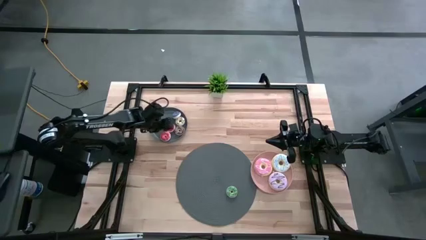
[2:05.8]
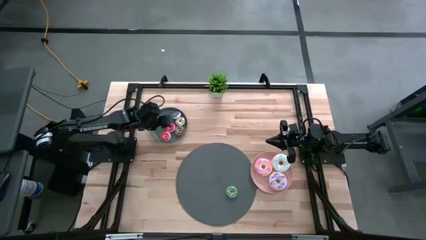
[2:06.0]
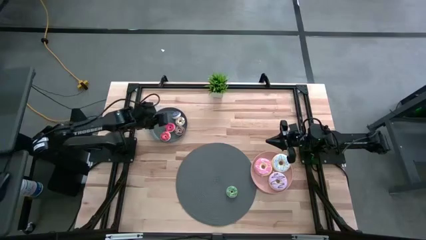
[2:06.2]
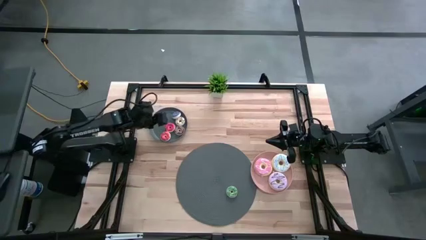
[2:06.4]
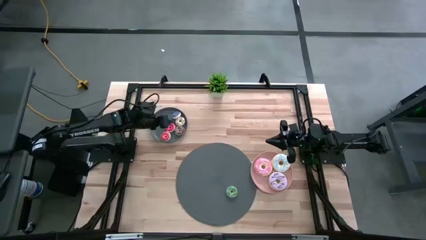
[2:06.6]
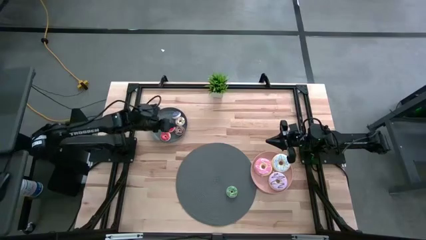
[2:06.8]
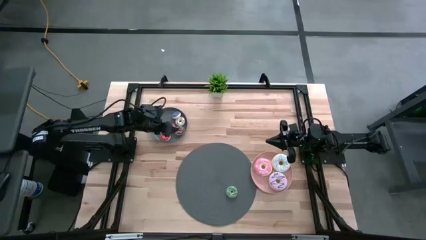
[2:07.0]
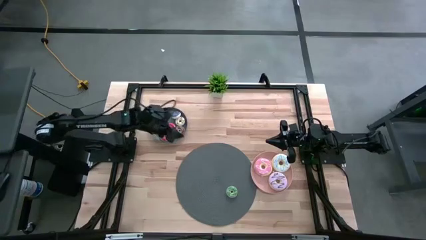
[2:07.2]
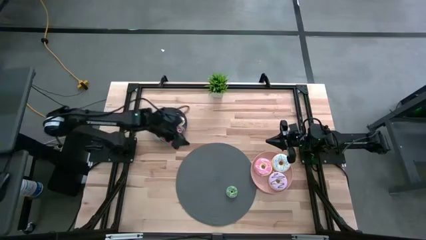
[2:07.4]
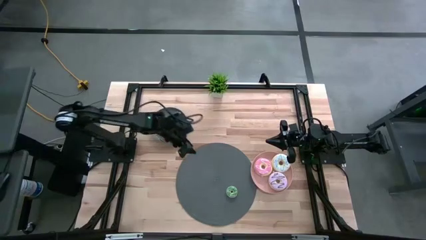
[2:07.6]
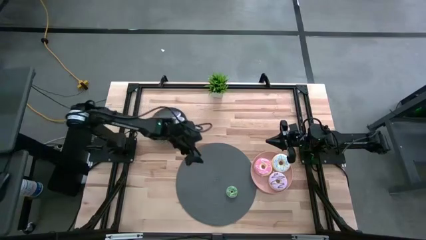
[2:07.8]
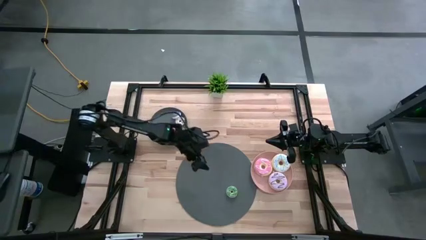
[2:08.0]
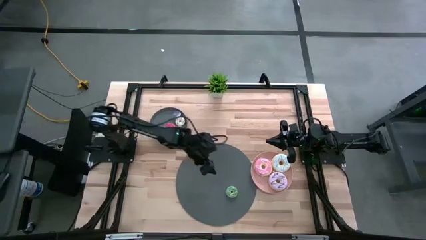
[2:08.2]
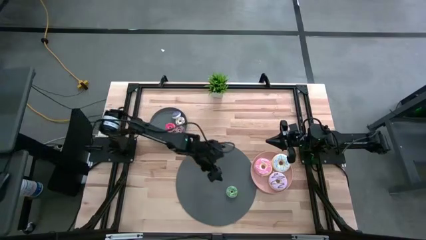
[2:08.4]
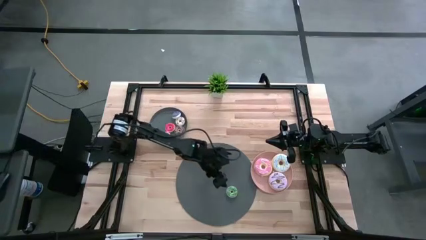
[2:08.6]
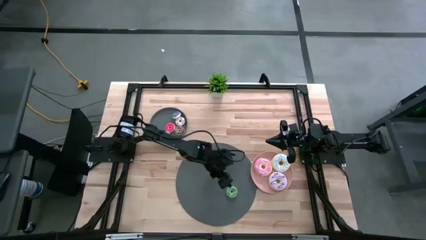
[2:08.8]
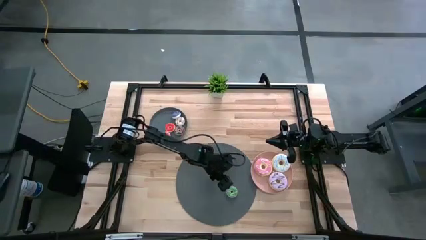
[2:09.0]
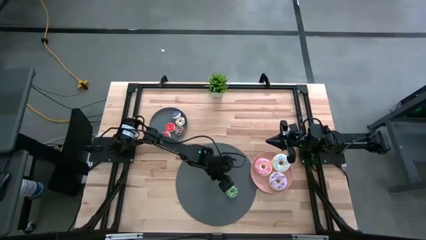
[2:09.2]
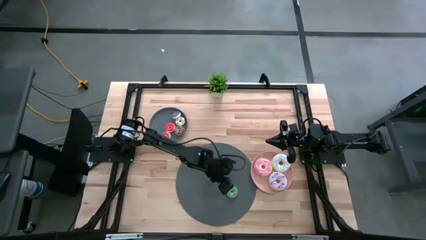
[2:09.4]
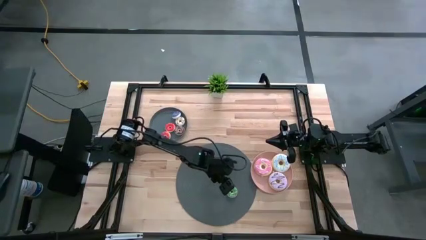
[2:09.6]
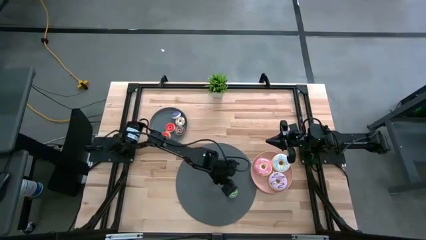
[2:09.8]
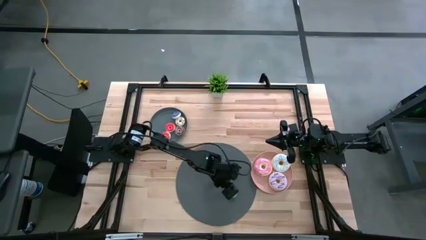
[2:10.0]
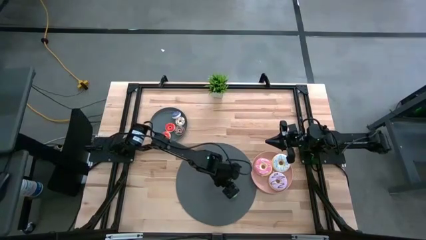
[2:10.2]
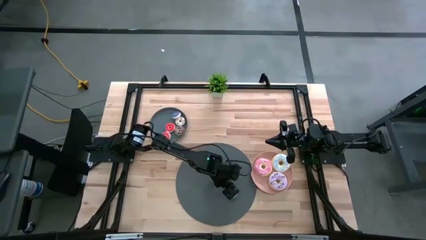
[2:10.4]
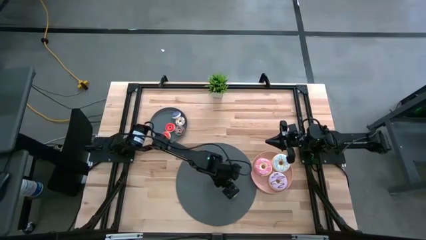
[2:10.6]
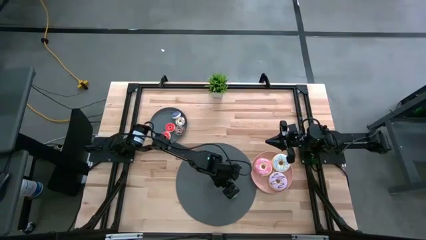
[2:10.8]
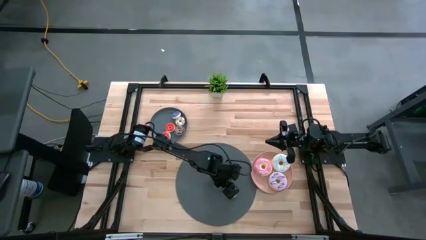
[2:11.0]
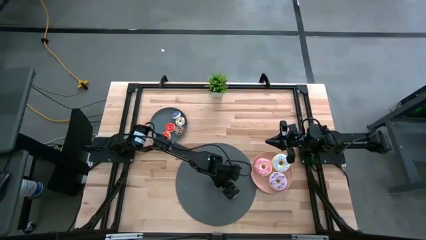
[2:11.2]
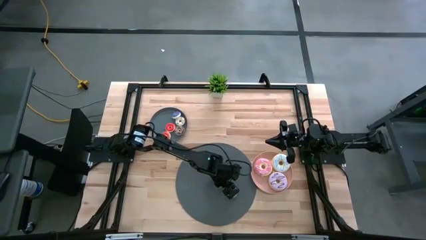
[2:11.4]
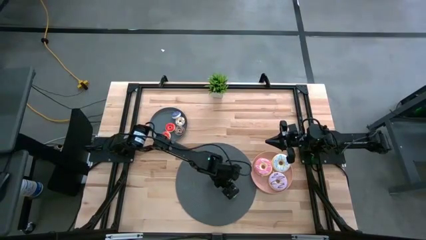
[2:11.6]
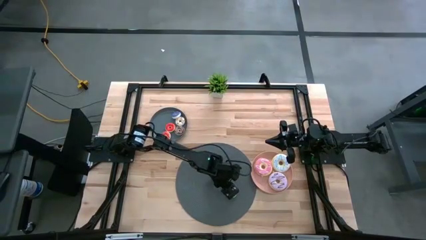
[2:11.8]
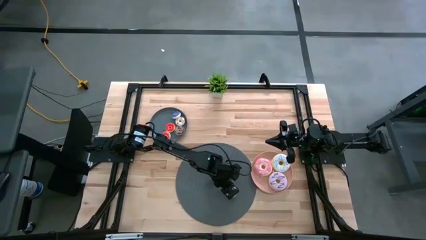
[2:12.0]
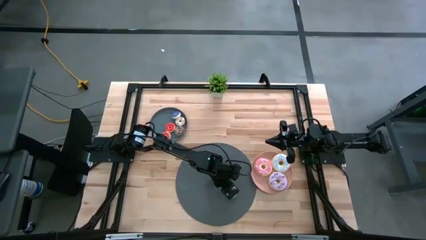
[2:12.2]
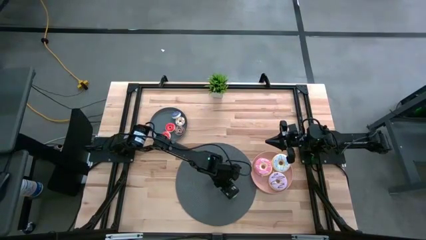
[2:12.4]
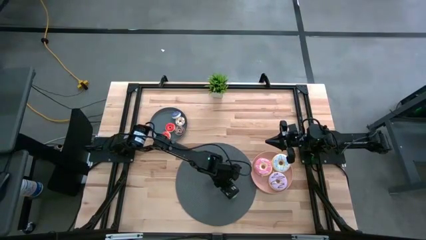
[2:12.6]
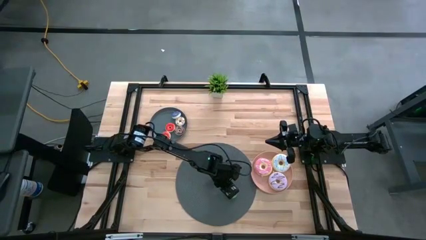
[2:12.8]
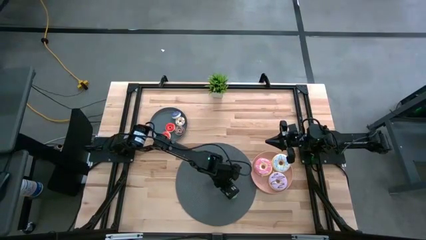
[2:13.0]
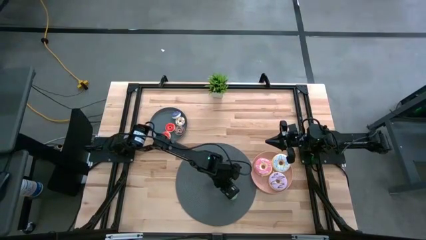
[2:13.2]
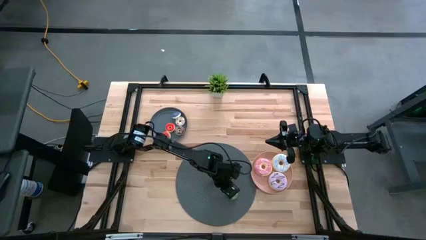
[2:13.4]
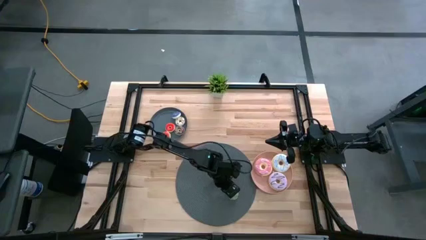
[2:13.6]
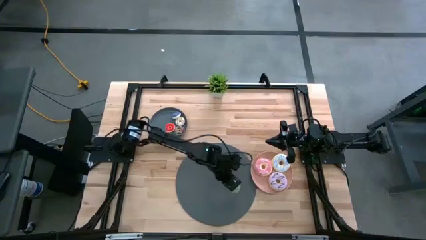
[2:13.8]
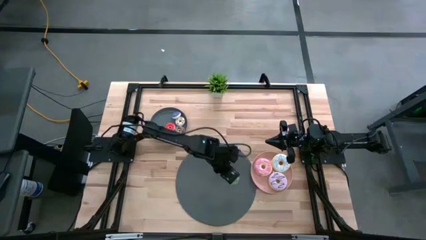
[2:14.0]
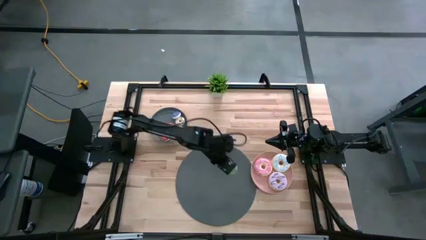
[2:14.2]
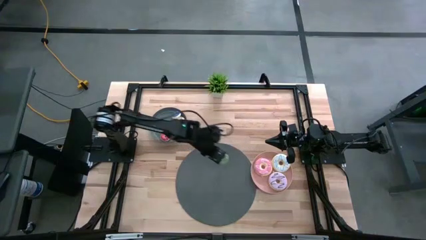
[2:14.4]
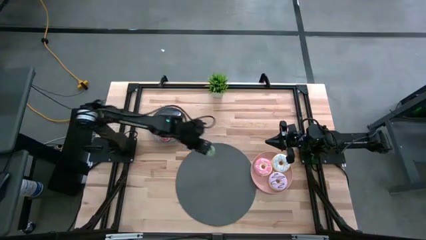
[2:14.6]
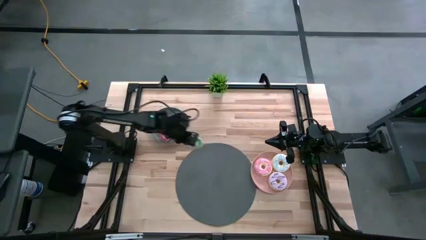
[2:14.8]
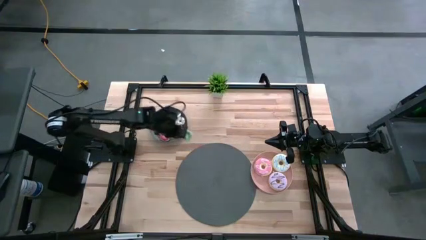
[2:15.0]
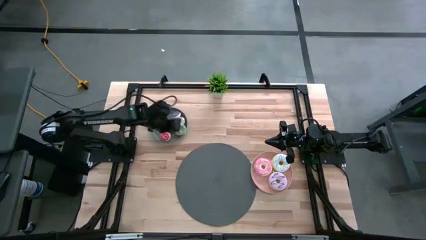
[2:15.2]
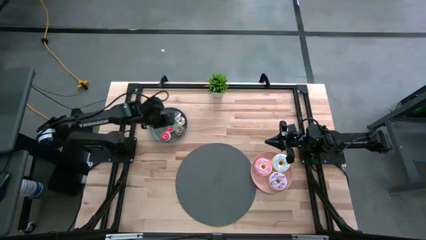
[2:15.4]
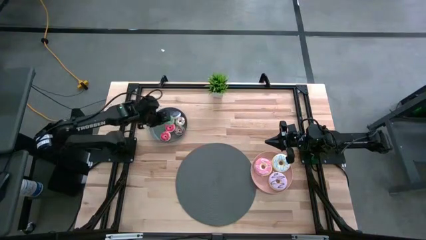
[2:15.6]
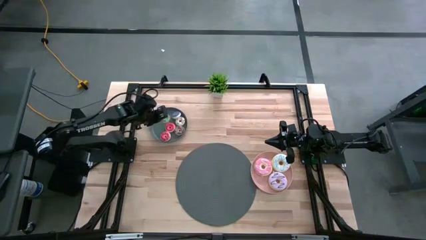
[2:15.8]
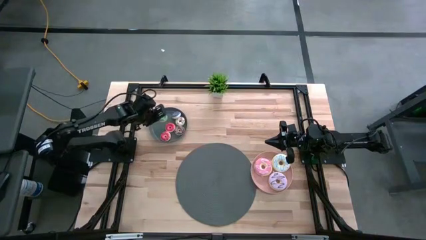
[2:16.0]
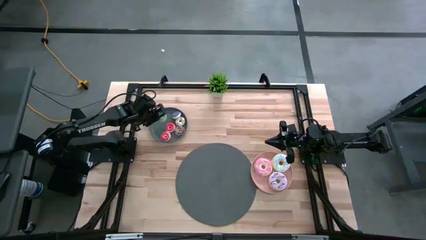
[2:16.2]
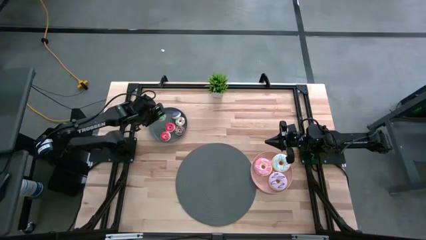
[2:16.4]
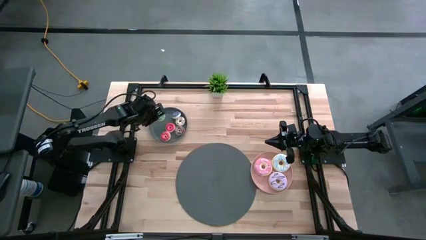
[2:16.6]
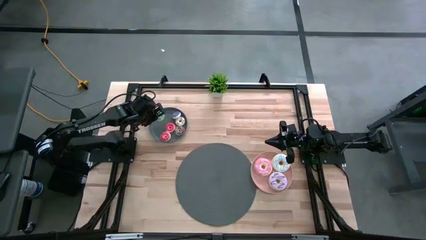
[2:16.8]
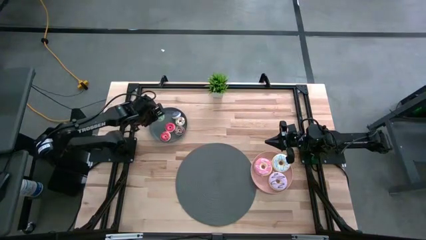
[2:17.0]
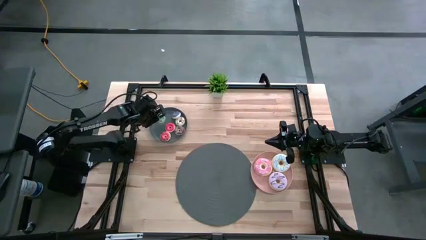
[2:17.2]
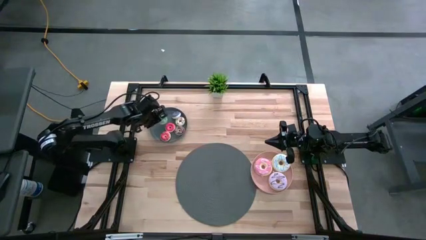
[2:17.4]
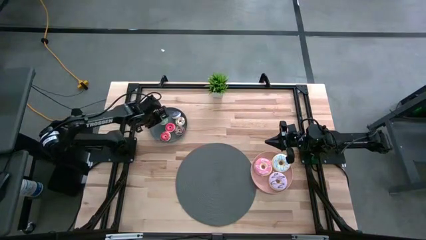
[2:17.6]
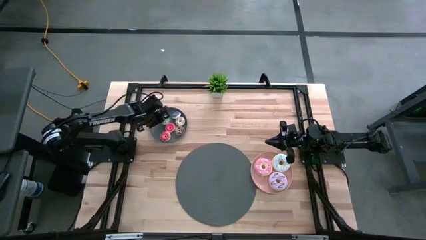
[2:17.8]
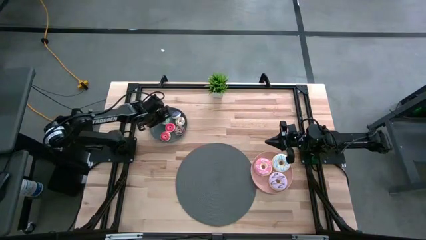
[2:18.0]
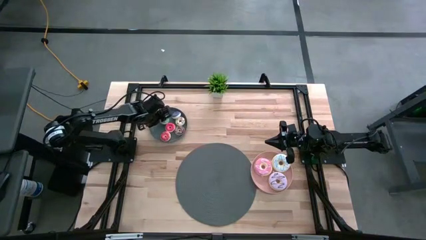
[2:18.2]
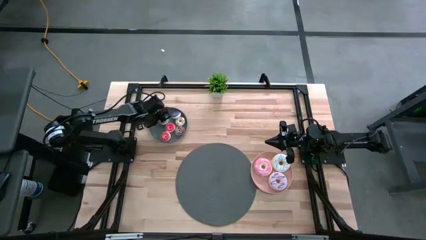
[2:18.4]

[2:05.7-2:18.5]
Task: Pick & Place donuts
Put the small green donut on the gray plate

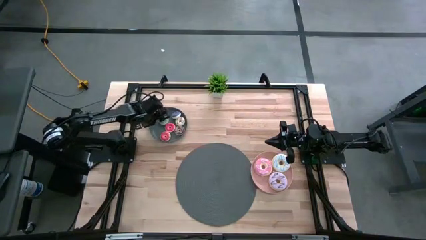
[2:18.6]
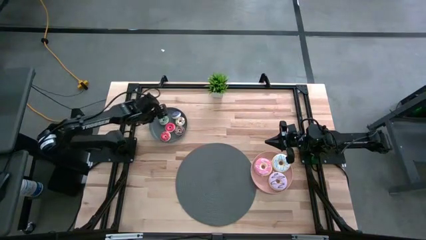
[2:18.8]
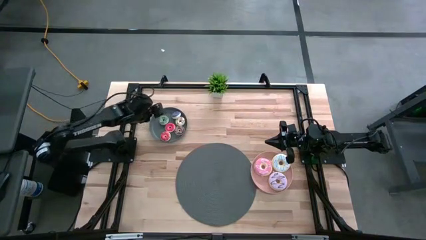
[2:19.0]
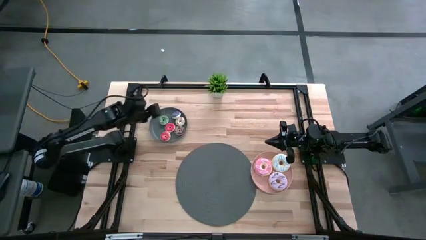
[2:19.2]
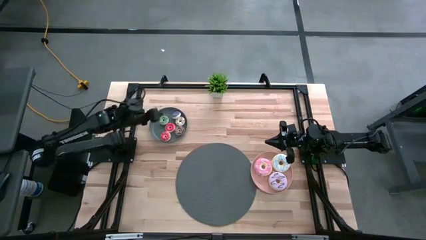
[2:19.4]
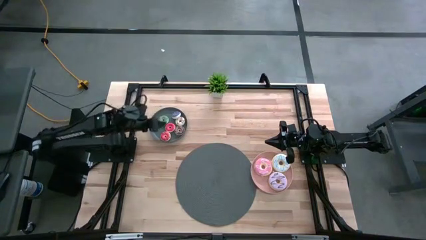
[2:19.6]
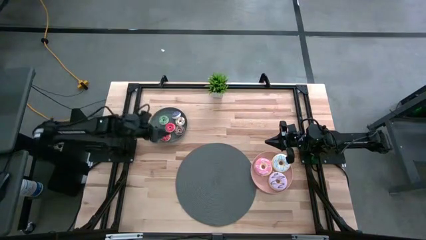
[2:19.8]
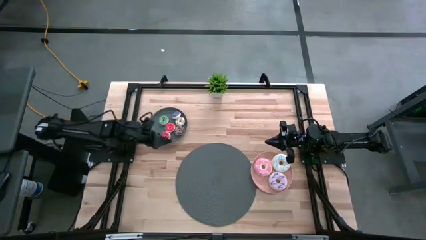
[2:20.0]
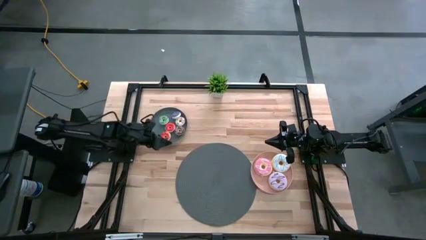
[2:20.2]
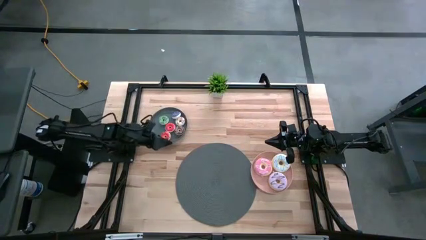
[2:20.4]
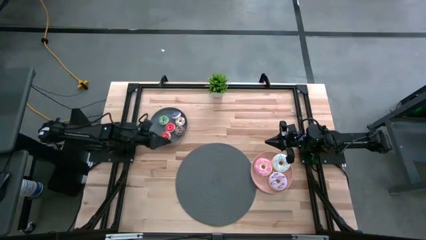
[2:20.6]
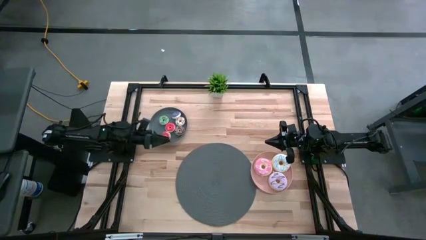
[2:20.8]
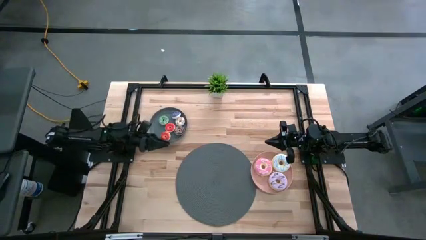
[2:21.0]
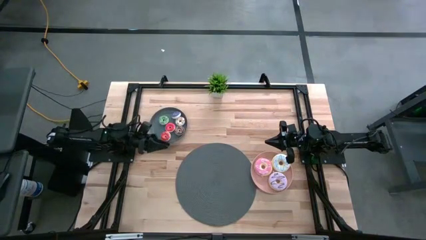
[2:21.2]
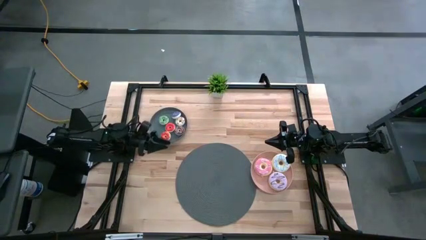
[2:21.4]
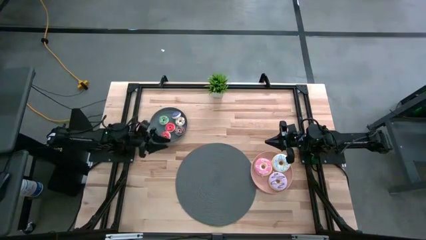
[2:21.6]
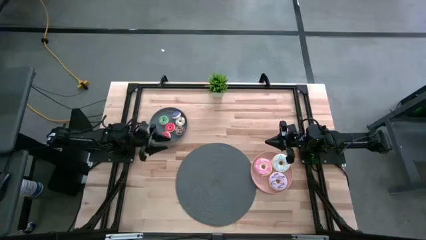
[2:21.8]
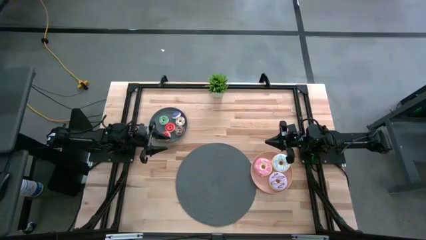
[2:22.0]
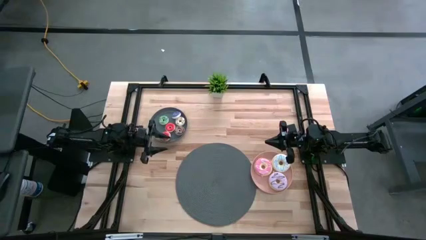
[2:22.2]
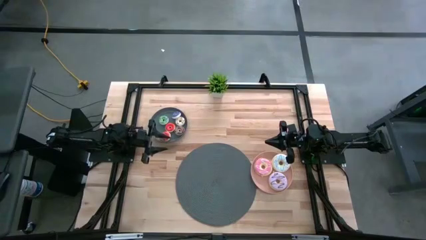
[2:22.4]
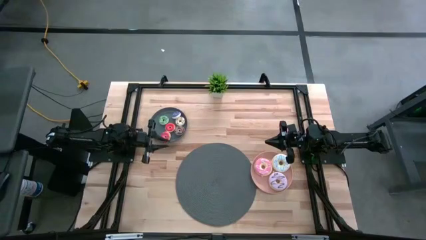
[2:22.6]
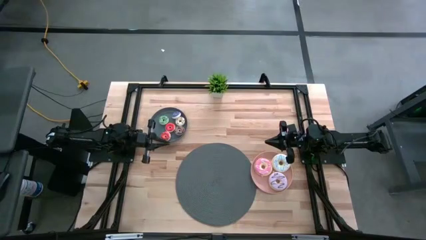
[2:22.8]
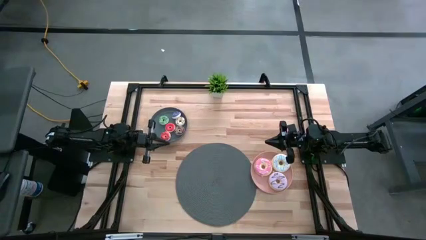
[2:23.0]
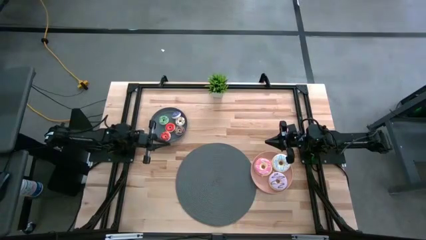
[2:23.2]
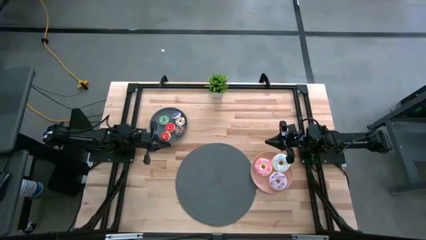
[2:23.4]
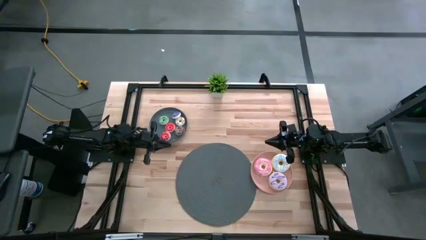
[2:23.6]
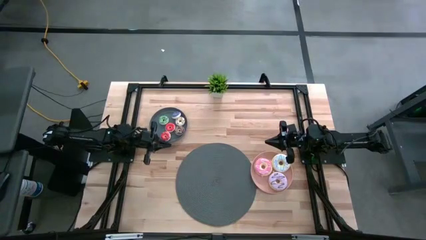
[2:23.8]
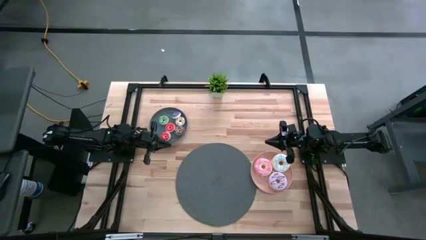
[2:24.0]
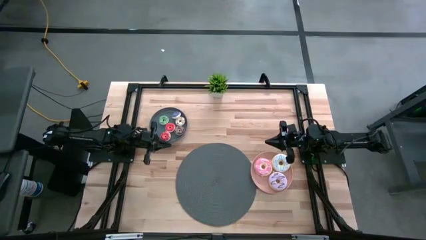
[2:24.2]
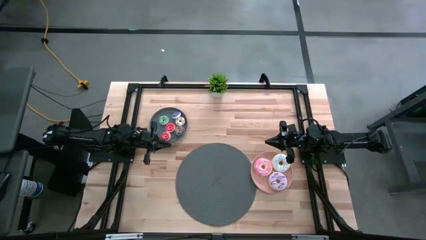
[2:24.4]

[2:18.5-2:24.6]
Return to Home Position
